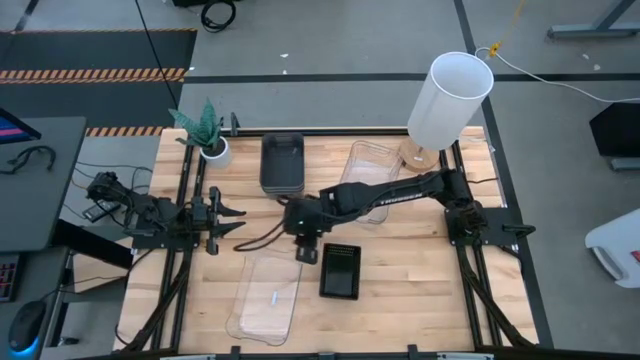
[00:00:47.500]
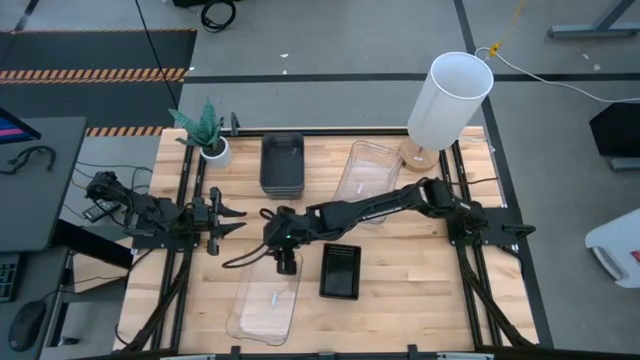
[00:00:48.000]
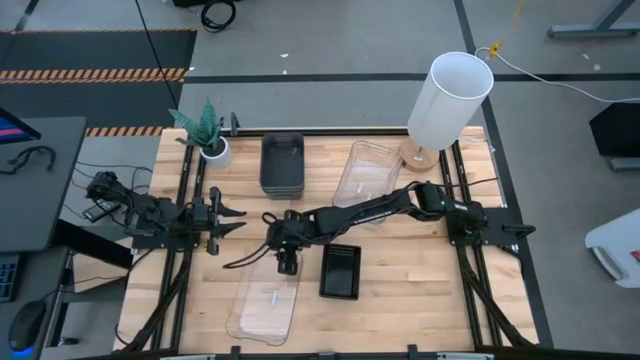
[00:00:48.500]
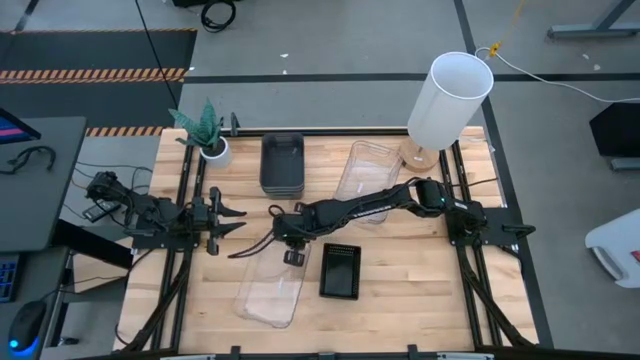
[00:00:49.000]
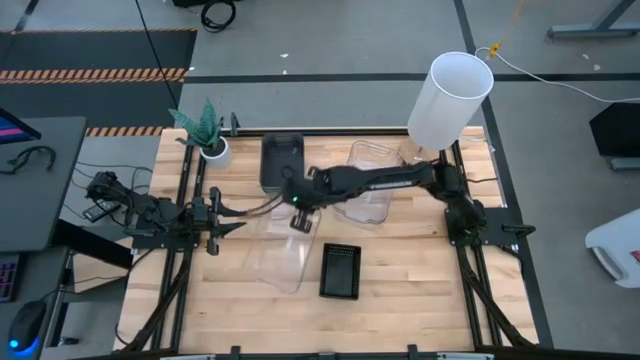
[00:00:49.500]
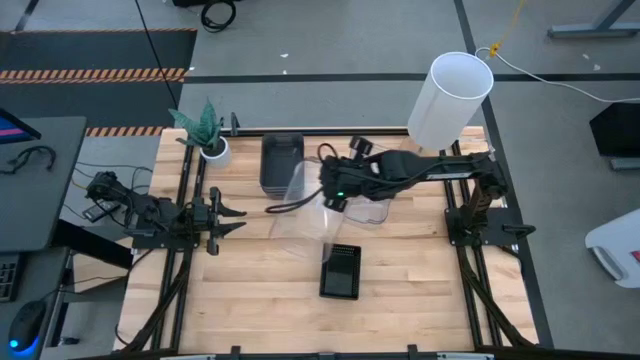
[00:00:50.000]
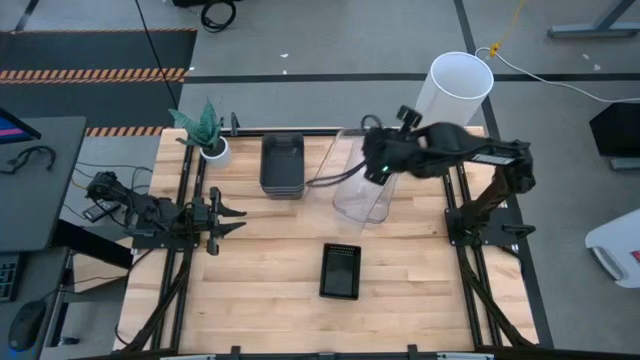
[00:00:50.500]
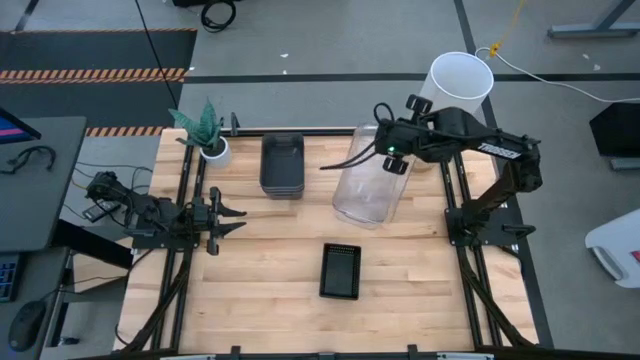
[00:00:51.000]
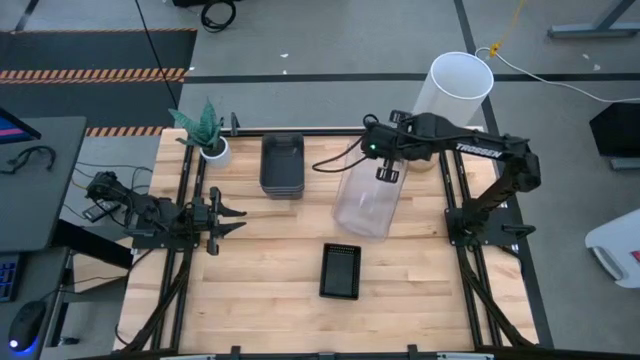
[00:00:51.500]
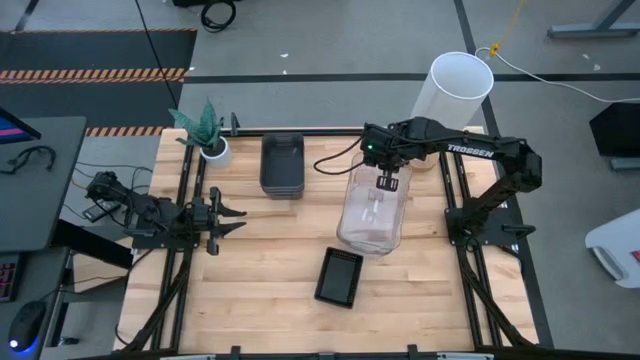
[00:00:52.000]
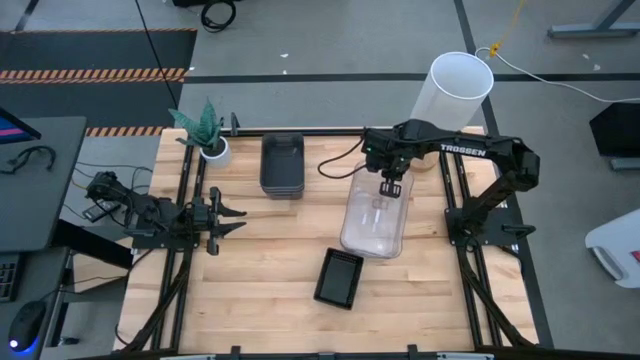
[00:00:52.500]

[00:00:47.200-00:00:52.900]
Stack the bottom transparent bin on the transparent bins

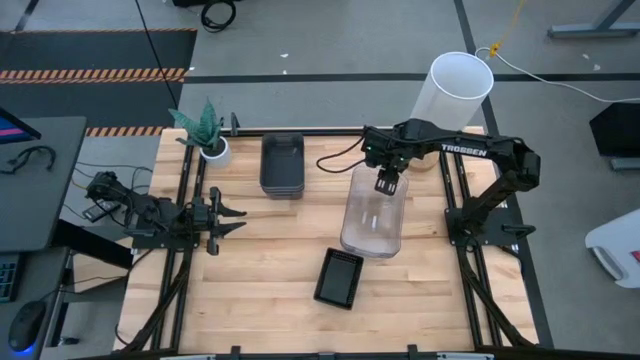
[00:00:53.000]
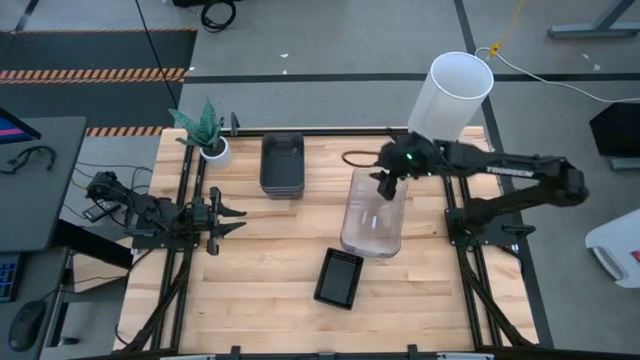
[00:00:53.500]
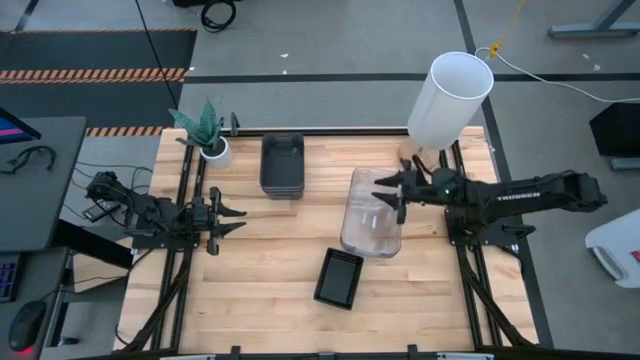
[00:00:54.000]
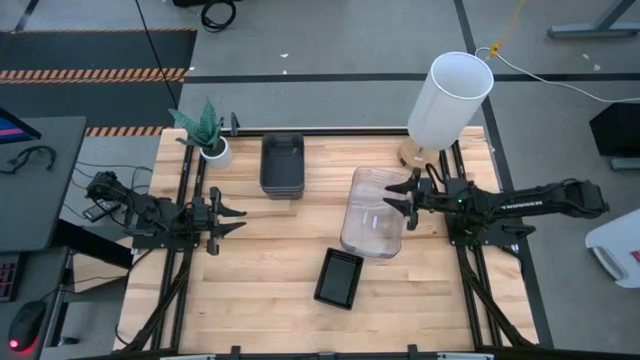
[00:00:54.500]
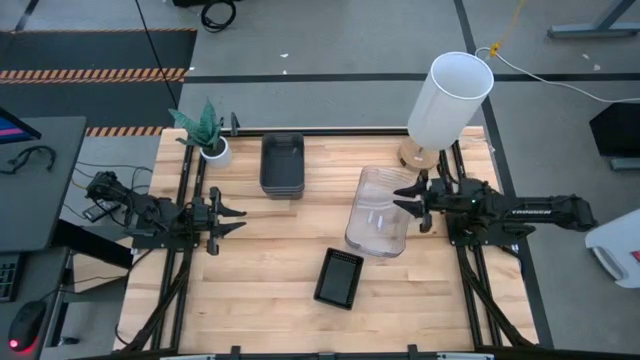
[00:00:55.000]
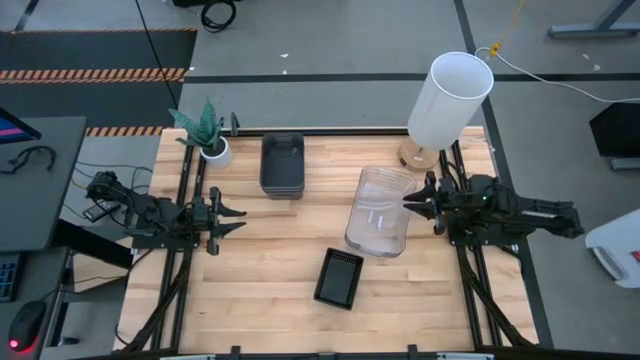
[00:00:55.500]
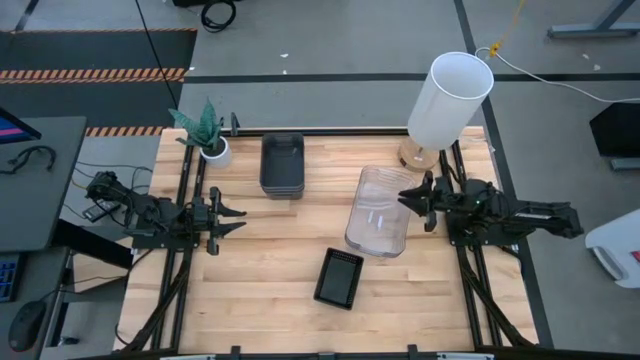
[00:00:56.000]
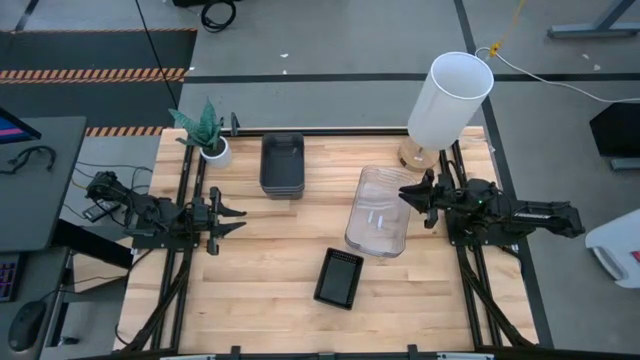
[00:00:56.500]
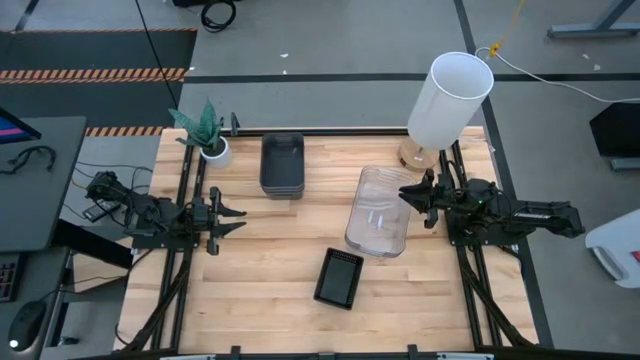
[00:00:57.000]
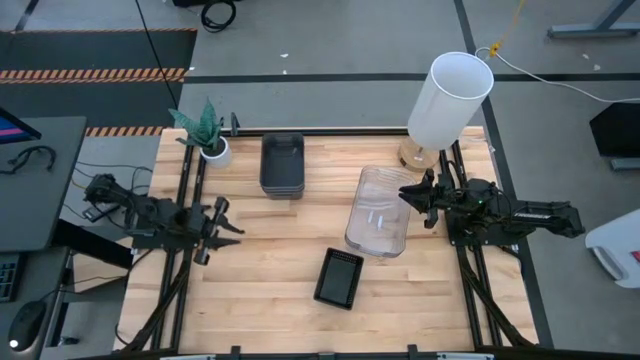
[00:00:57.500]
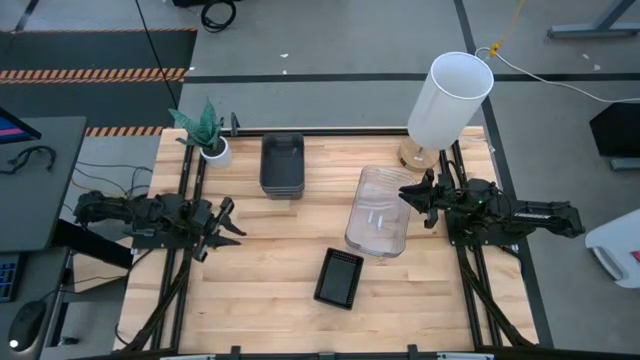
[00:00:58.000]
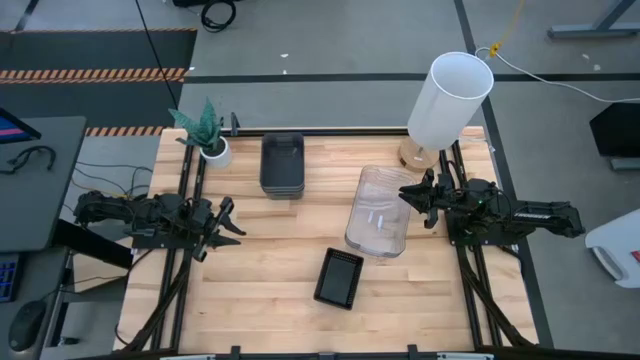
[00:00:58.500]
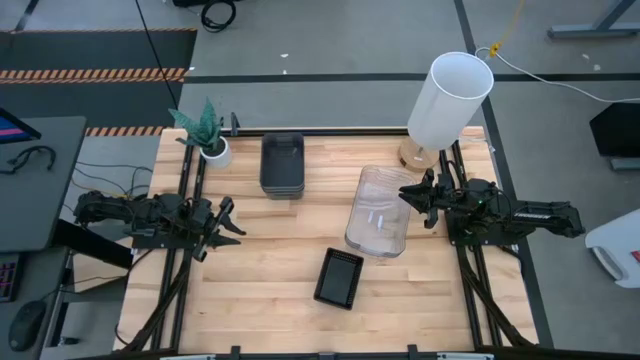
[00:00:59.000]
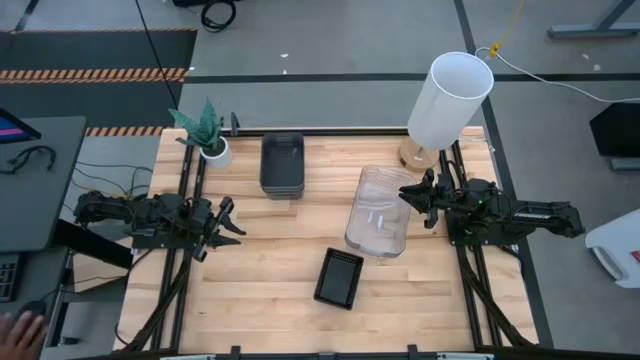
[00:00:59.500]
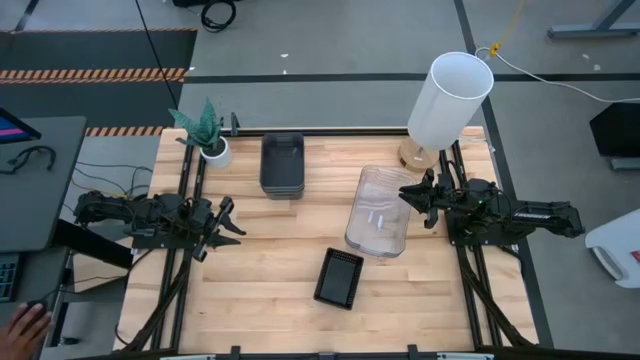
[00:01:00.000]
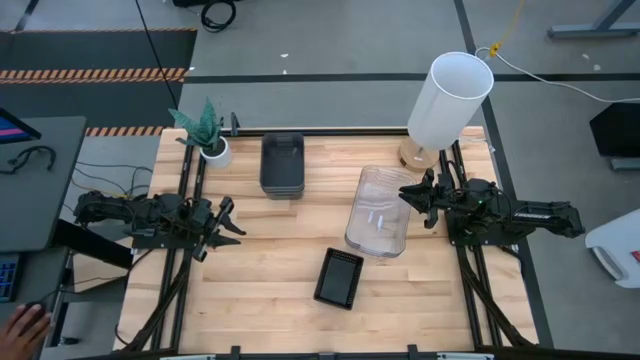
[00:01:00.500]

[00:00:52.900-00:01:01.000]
Return to Home Position

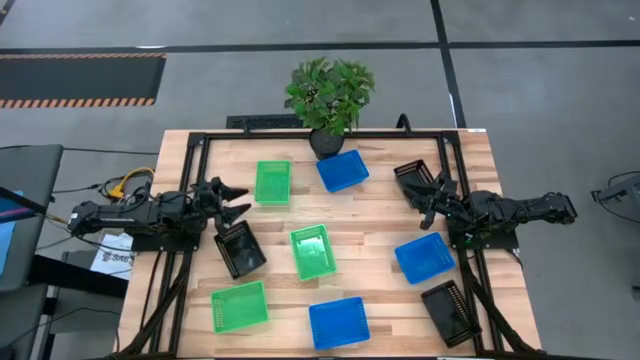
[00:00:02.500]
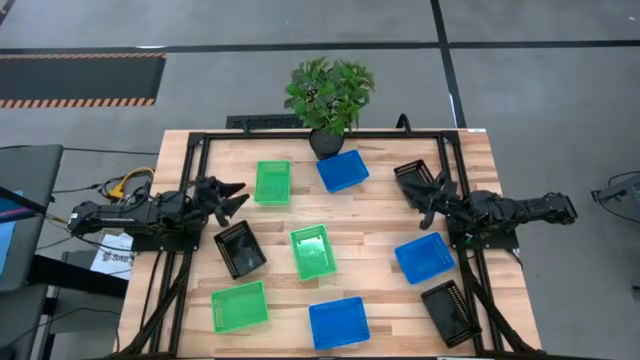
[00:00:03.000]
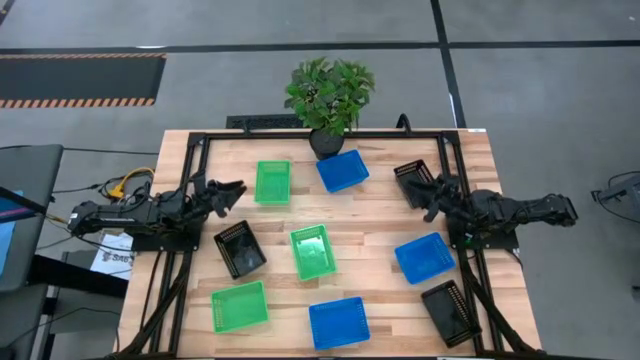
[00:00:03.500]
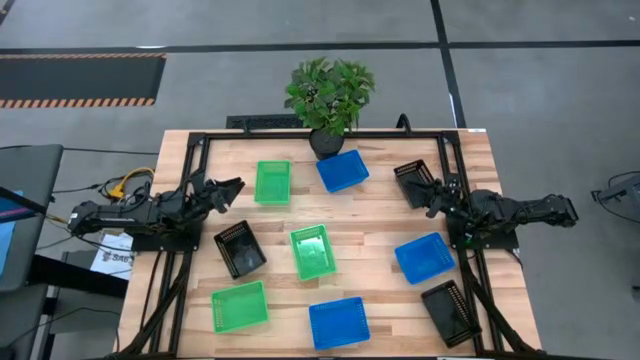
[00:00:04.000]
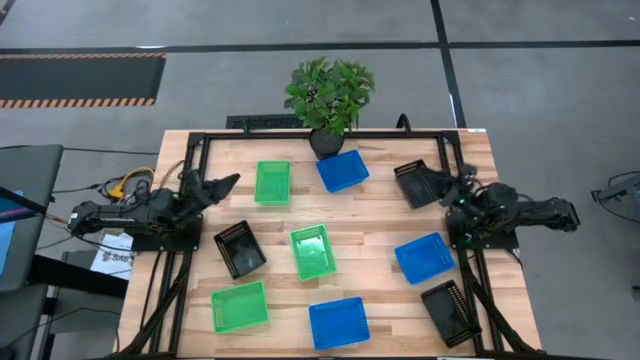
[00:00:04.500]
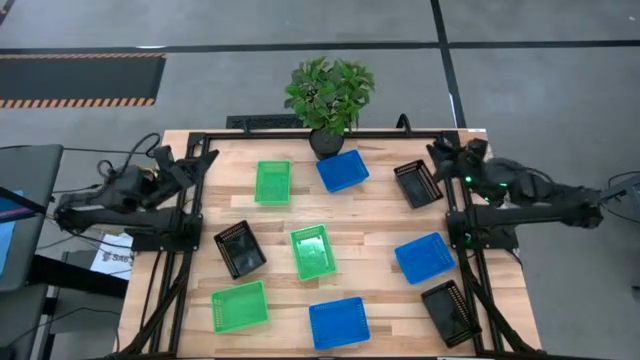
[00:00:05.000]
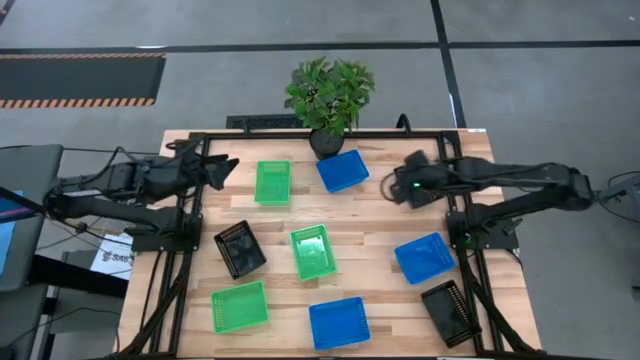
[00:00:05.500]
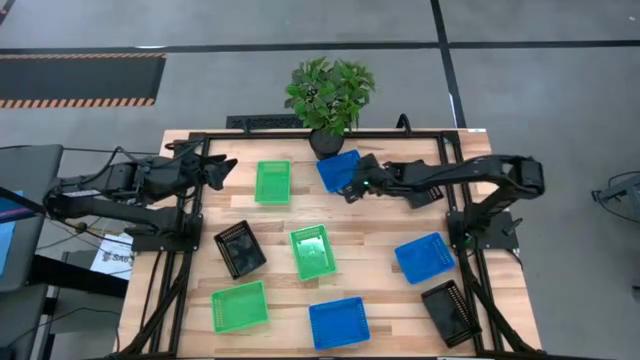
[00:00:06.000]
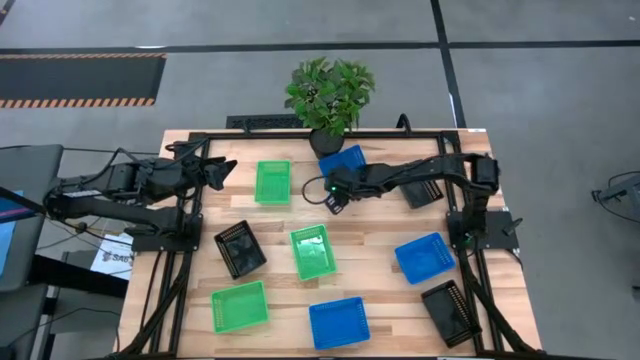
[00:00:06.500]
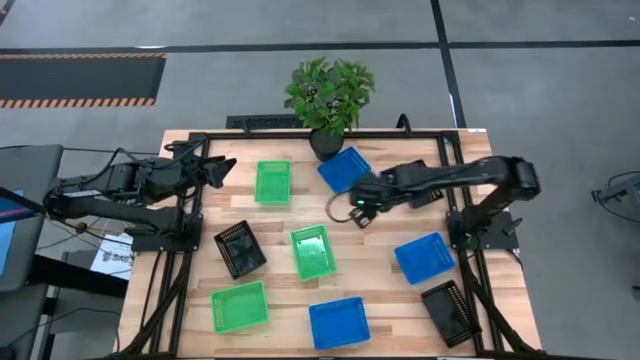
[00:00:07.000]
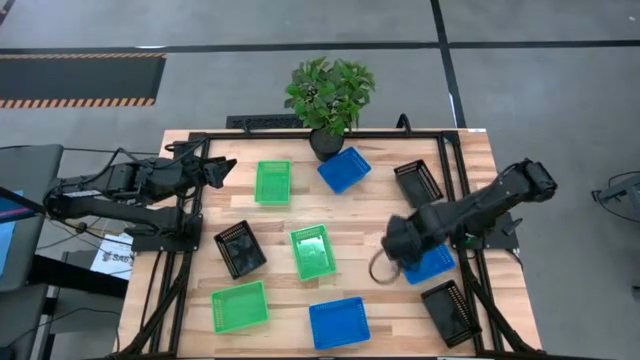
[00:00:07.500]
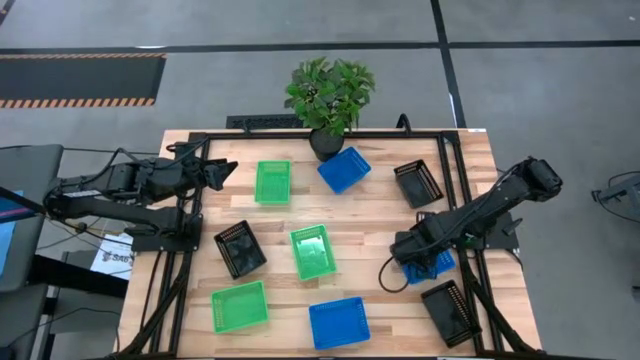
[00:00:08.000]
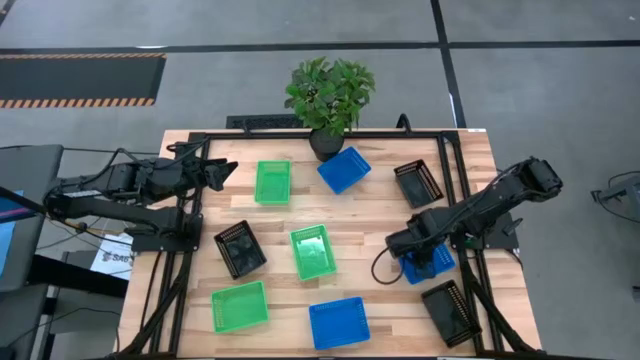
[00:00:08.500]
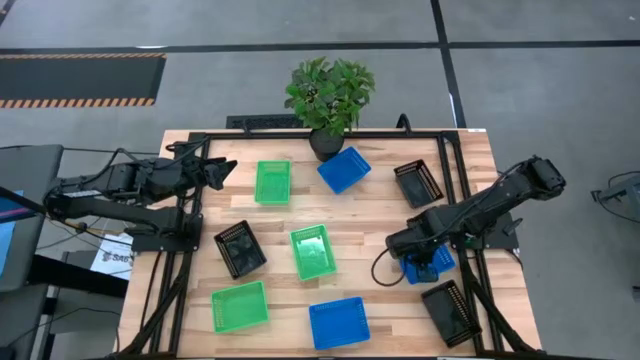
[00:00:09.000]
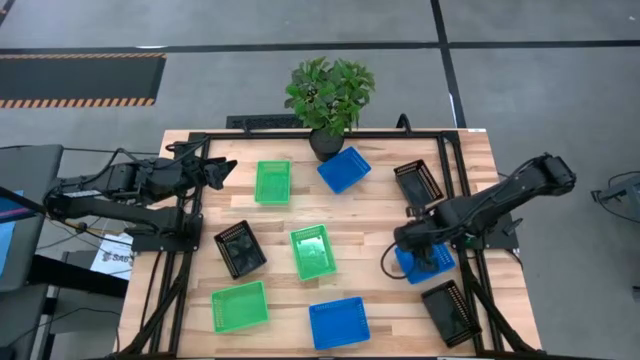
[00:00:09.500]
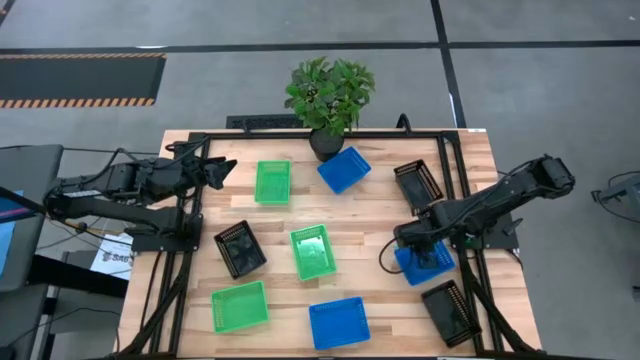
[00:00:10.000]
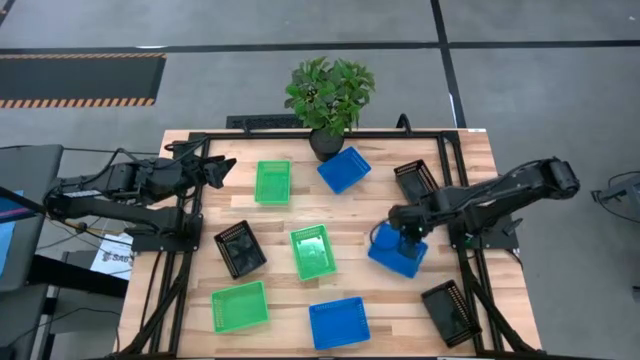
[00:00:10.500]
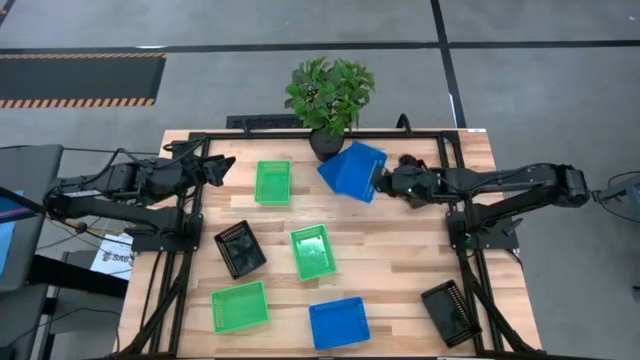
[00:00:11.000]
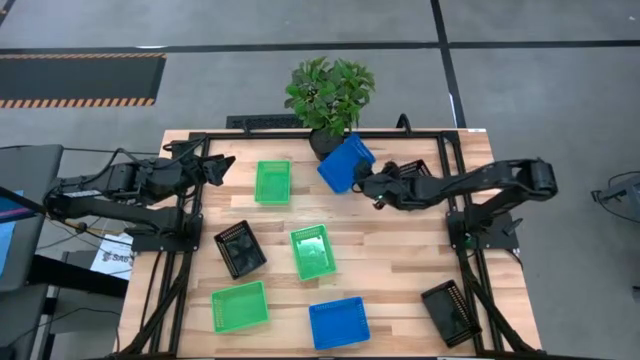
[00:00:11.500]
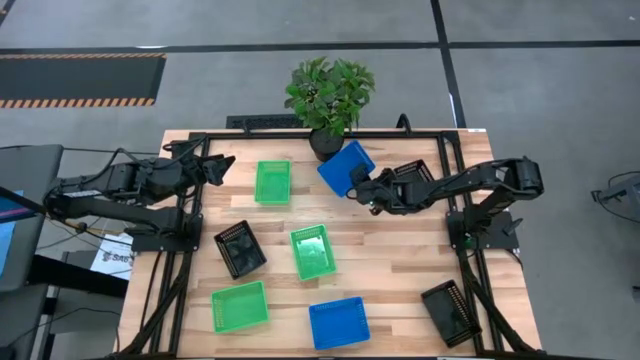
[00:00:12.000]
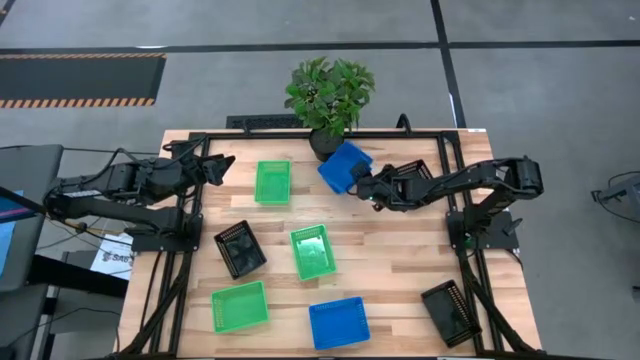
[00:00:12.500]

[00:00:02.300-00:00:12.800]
Stack the right blue basket on the top blue basket
